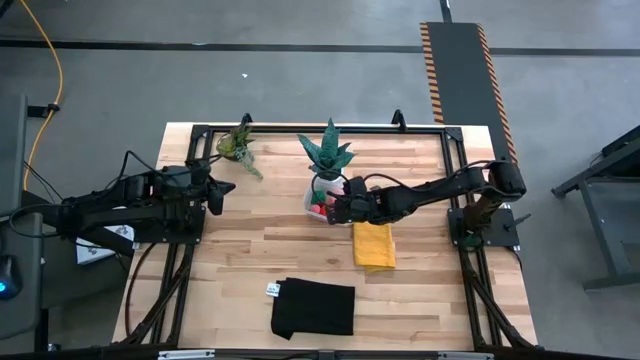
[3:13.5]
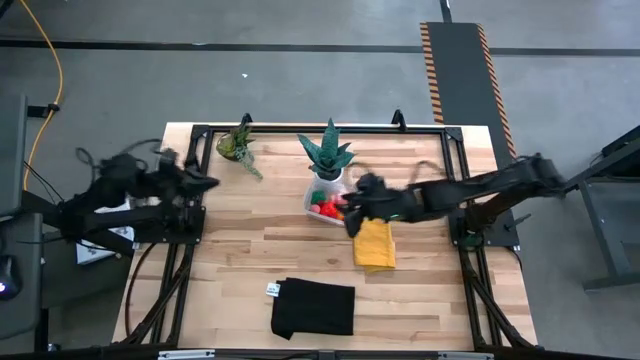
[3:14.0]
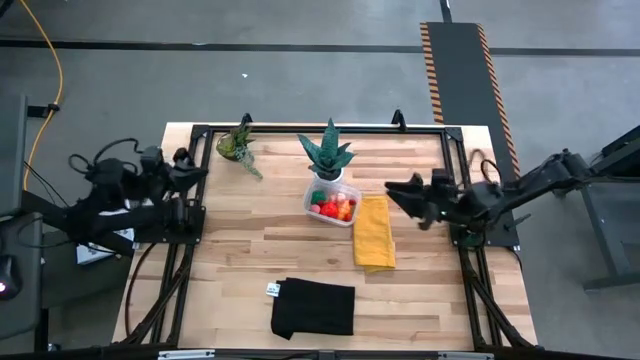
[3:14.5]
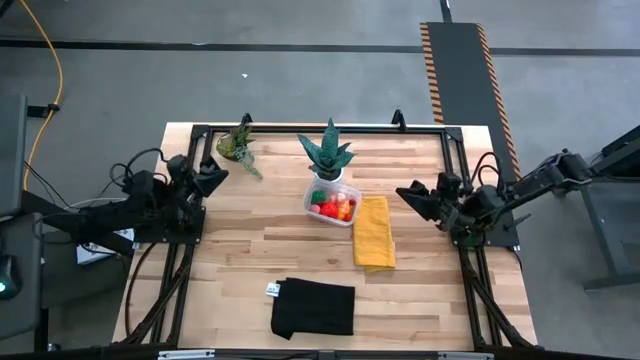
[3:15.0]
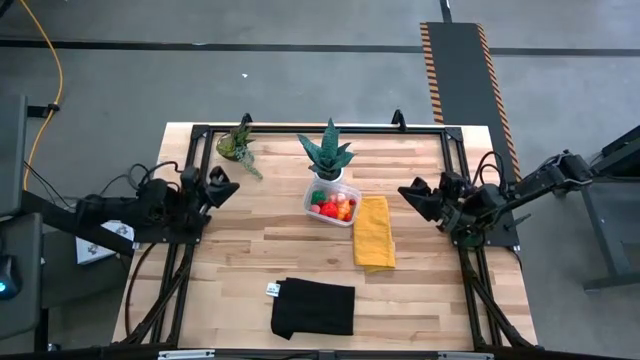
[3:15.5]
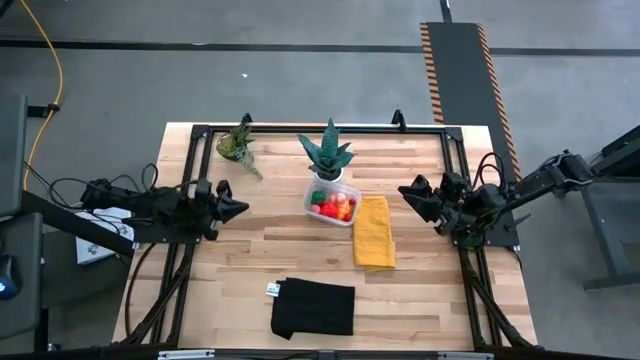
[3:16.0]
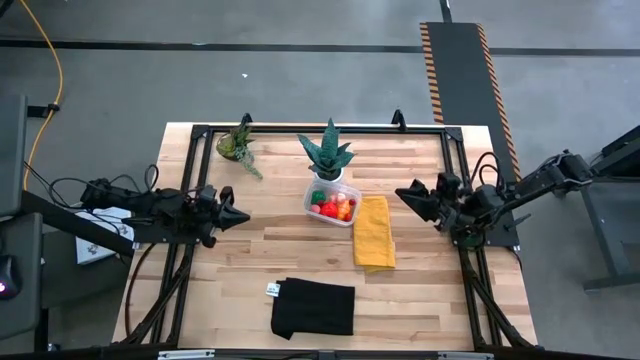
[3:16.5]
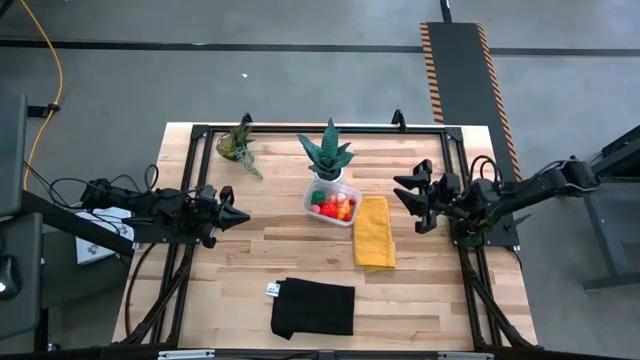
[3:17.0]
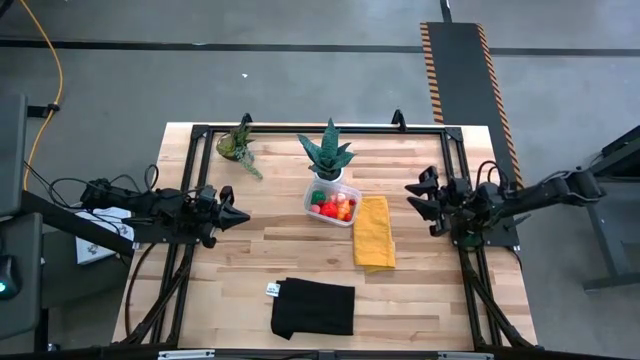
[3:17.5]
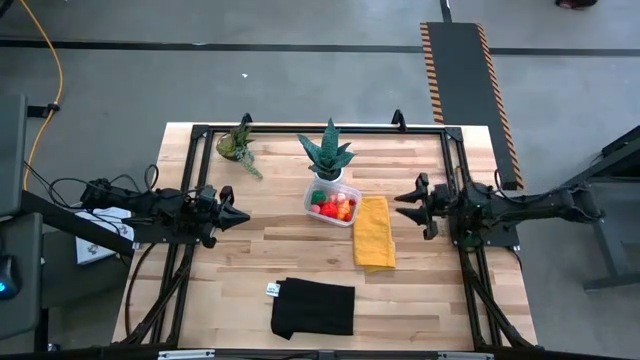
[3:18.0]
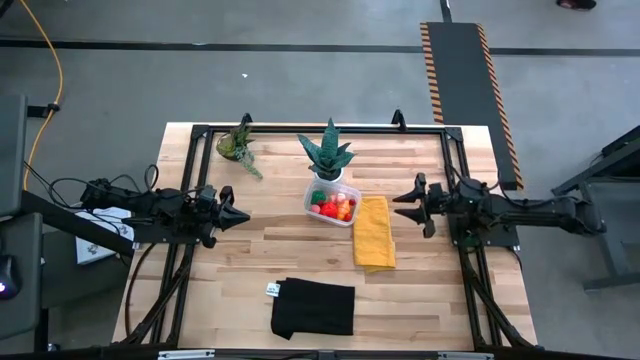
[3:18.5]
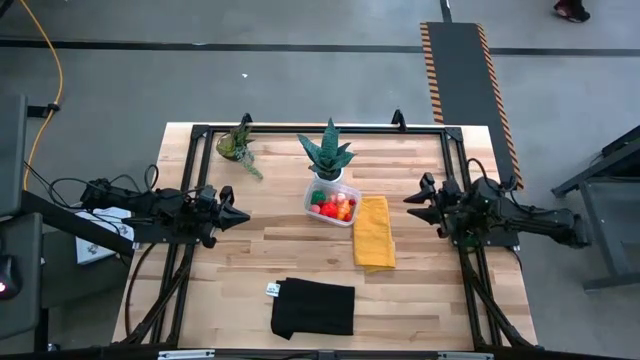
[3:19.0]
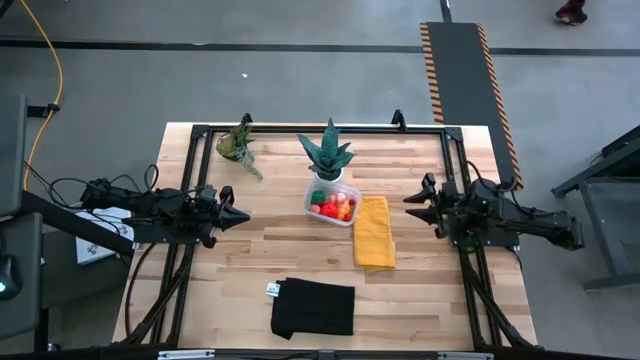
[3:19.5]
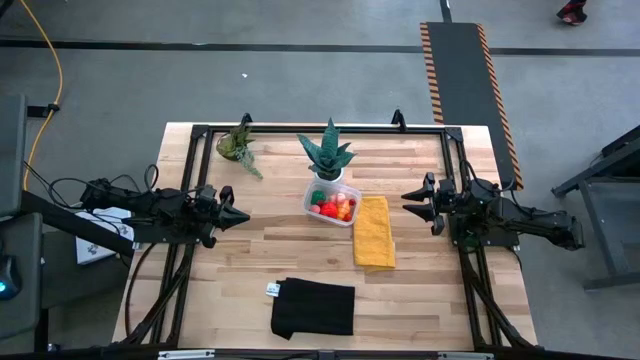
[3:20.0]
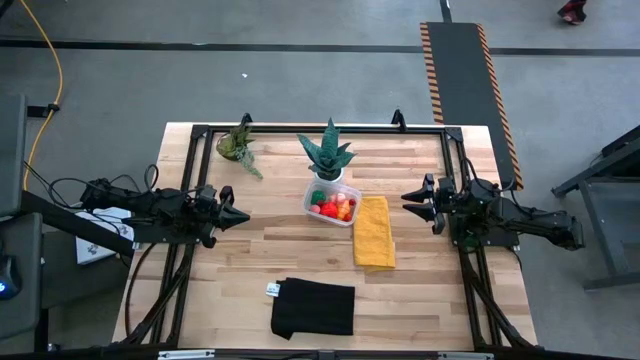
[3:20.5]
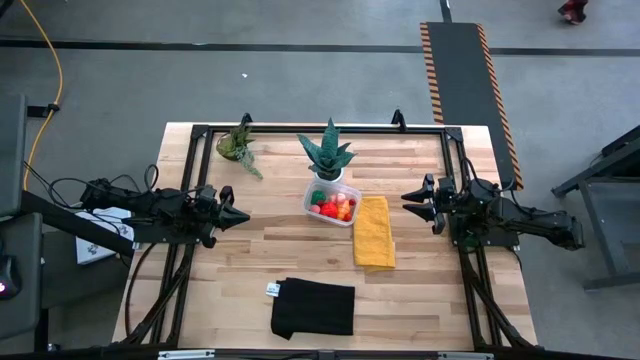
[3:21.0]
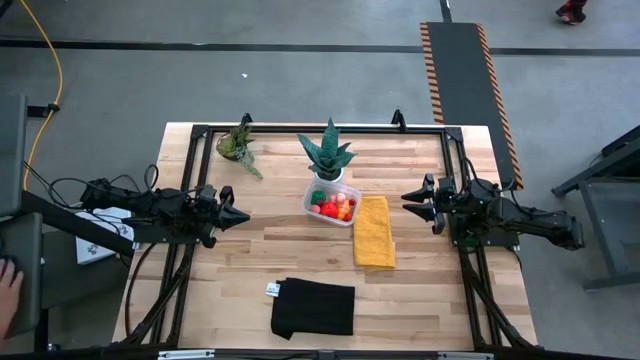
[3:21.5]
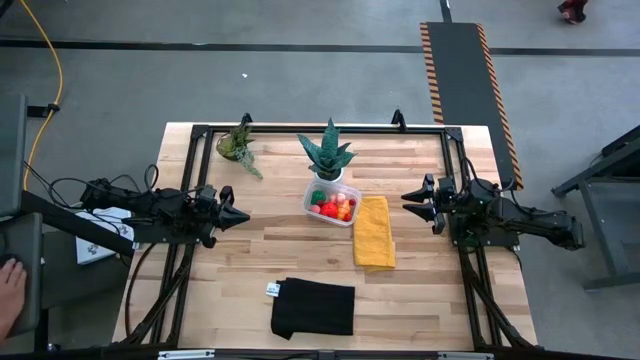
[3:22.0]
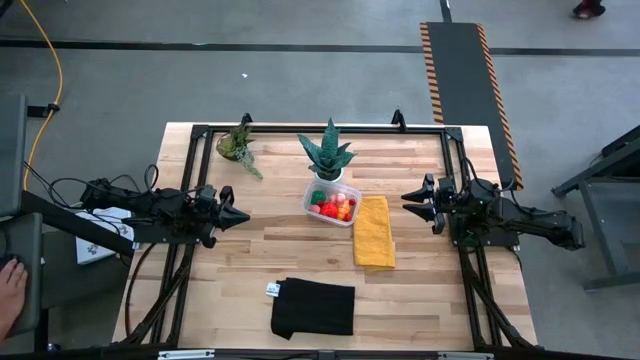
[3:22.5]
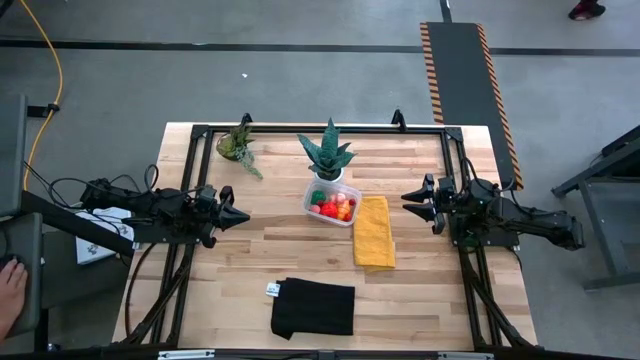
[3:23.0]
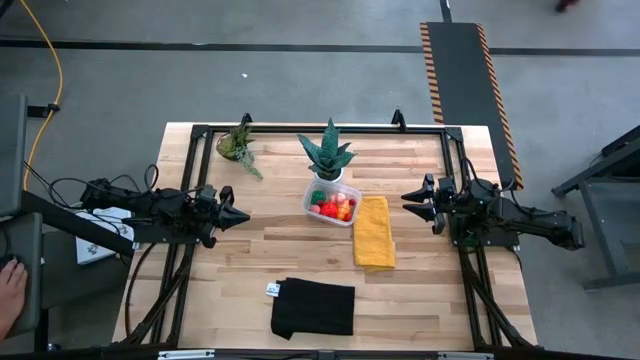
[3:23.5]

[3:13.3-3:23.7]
Task: Pick and placing Produce into tupperware
Return to Home Position

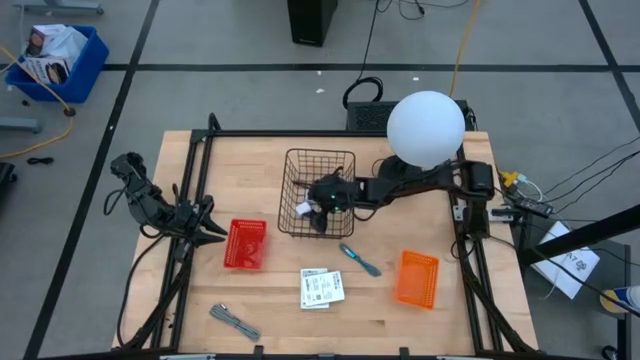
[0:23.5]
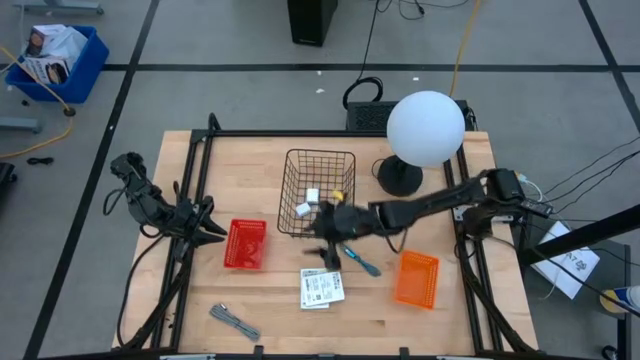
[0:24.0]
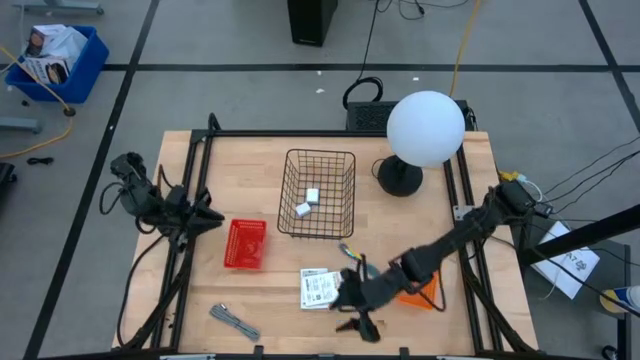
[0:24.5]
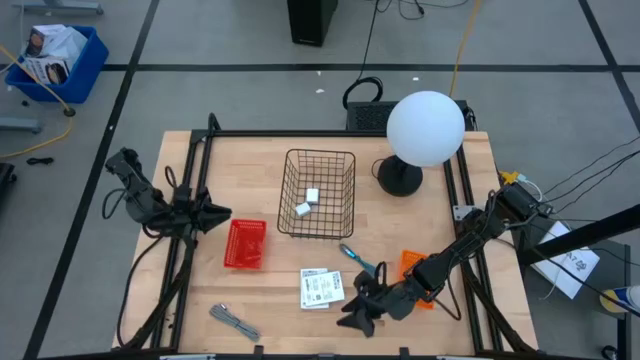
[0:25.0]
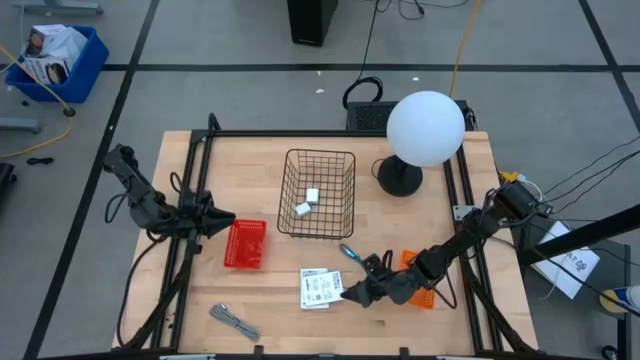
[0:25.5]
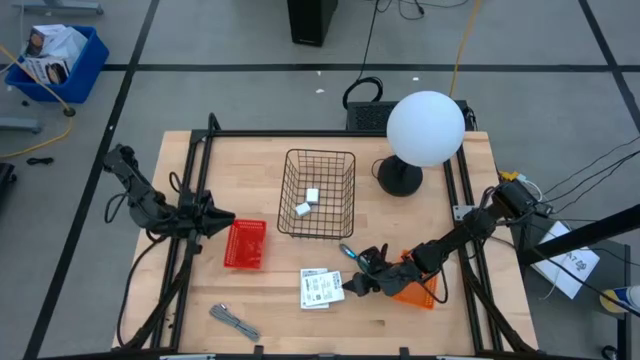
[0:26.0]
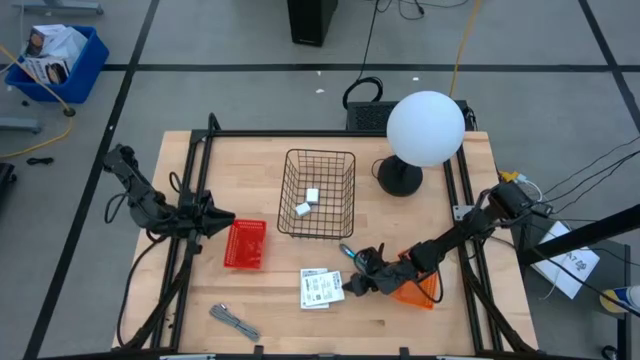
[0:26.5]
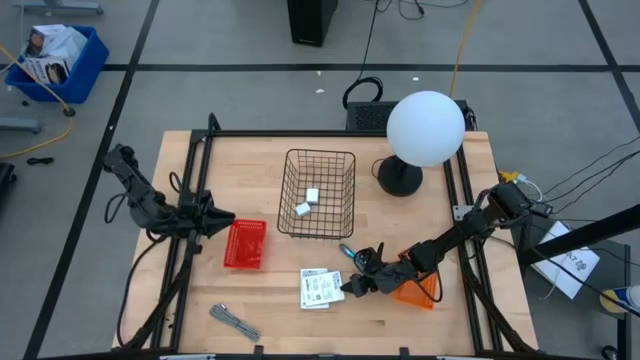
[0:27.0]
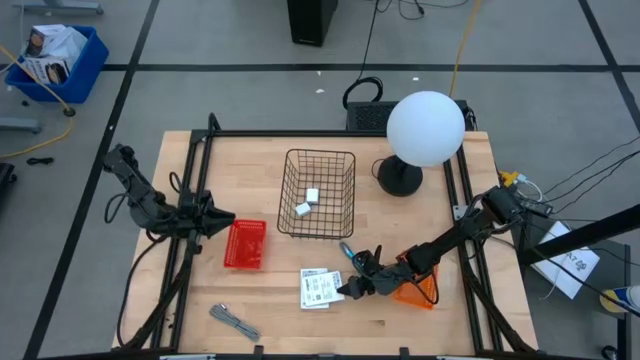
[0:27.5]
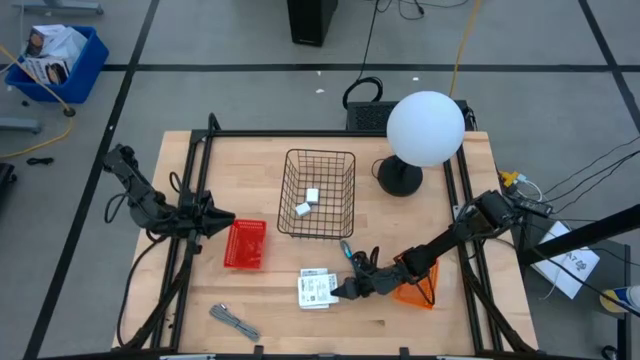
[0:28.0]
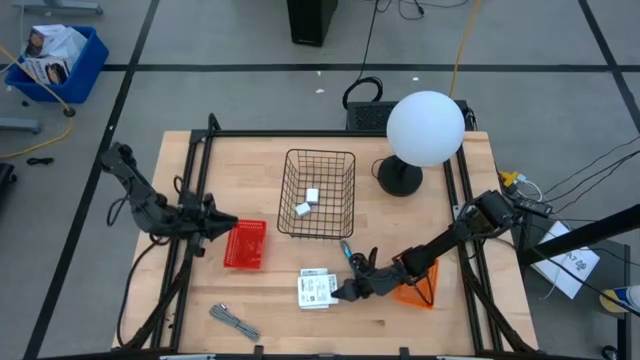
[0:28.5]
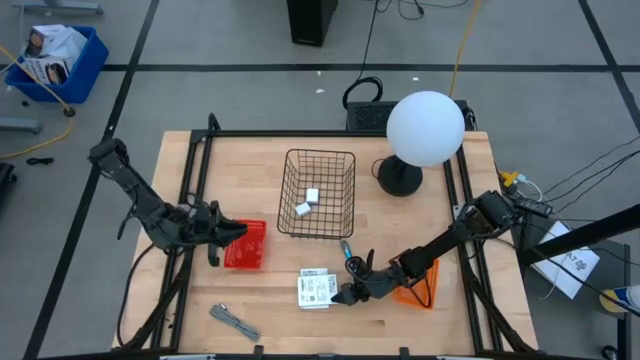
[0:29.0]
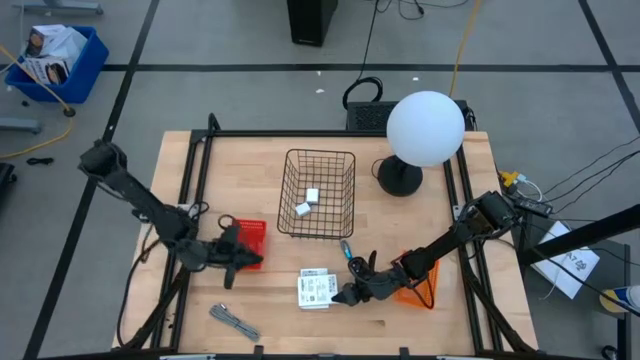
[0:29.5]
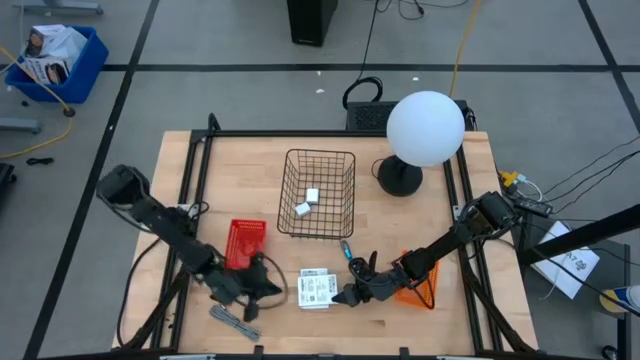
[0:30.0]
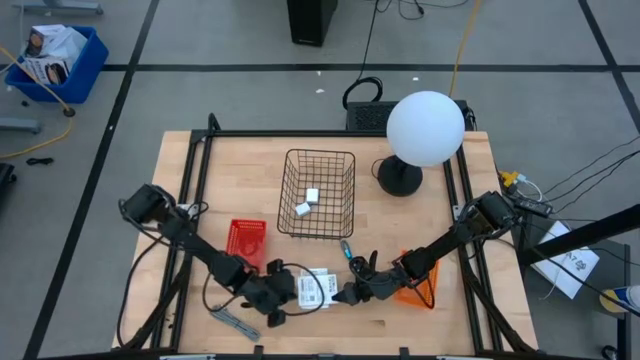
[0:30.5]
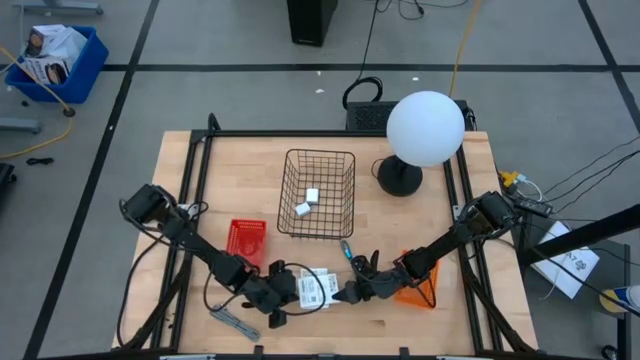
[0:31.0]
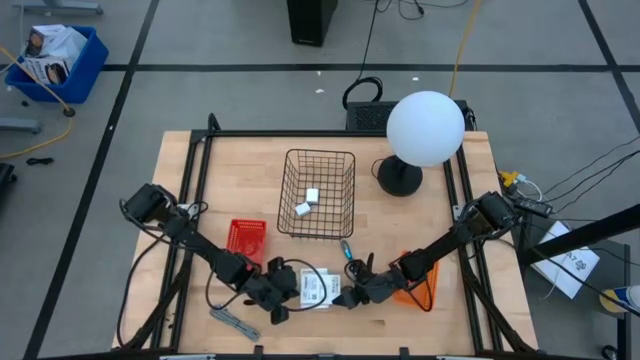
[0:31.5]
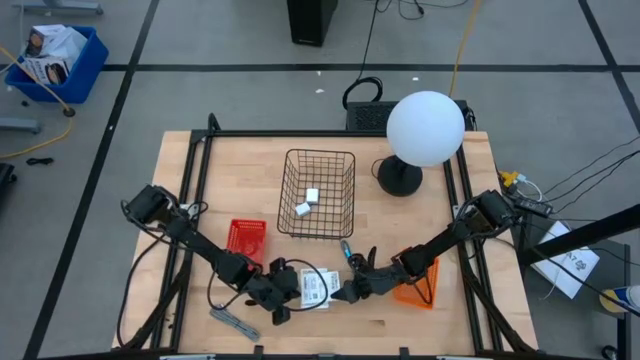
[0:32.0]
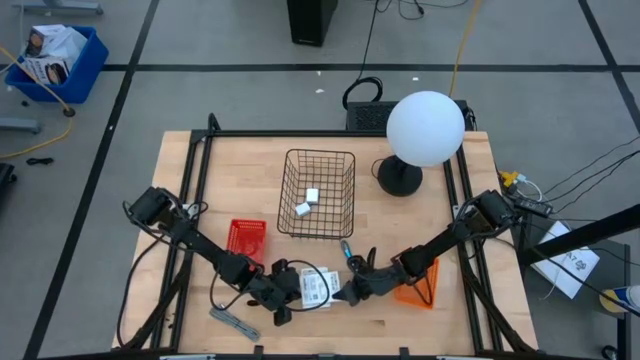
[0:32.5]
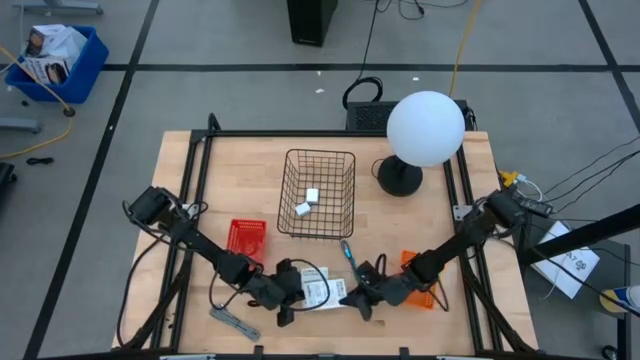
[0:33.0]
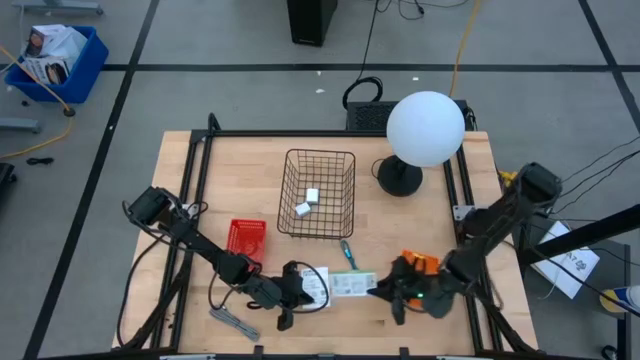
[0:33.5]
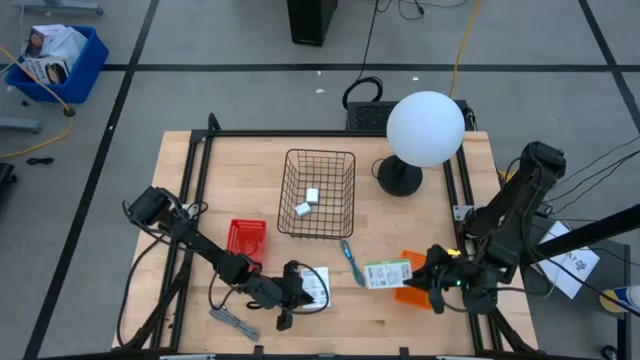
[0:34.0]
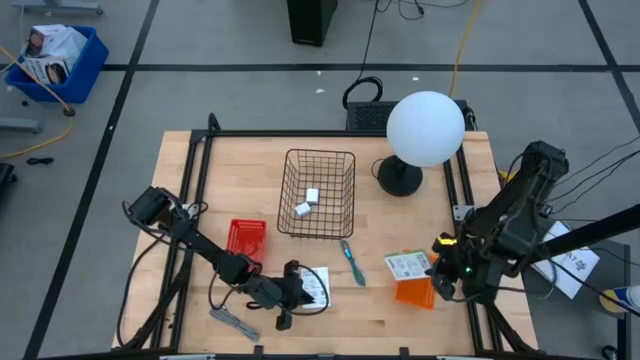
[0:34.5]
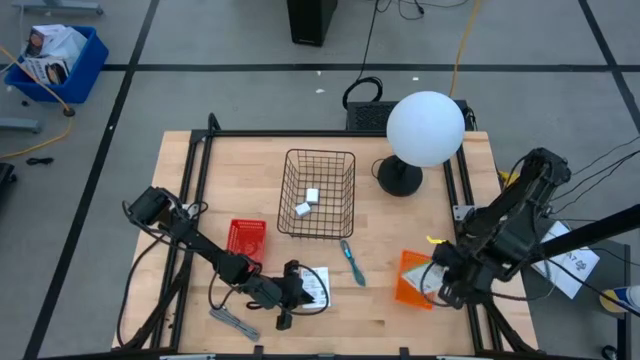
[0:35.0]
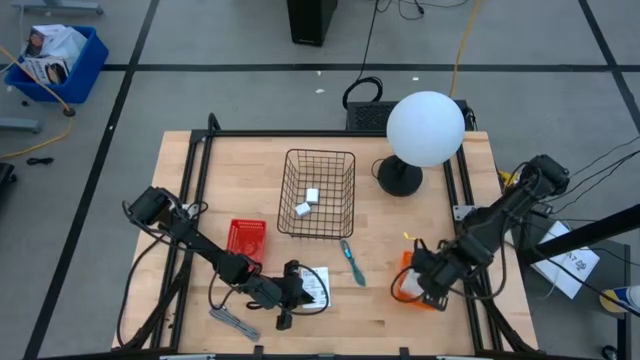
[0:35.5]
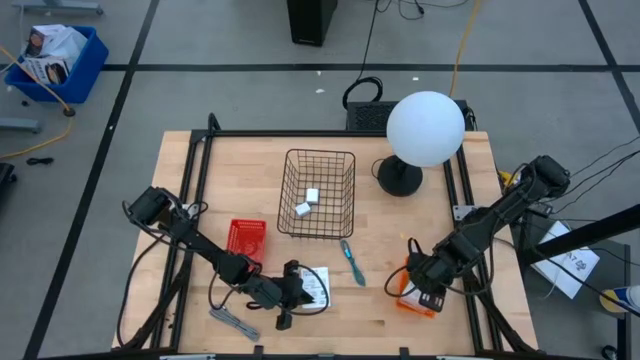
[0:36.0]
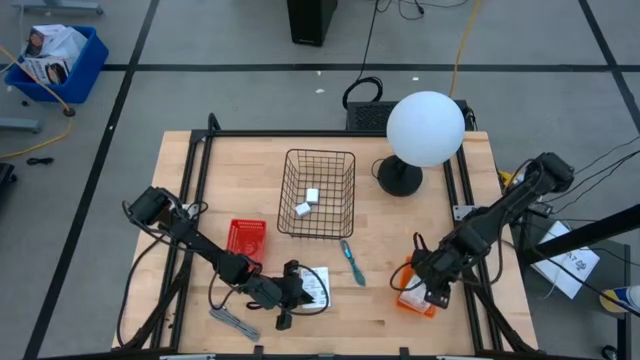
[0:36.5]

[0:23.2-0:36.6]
Task: Pick and place items into bin
Put the card reader box into the orange basket
